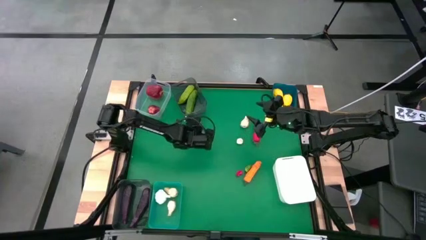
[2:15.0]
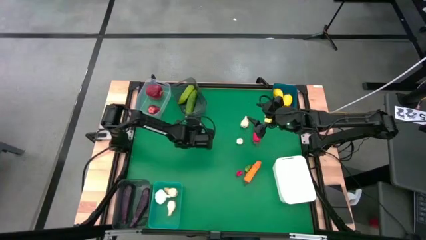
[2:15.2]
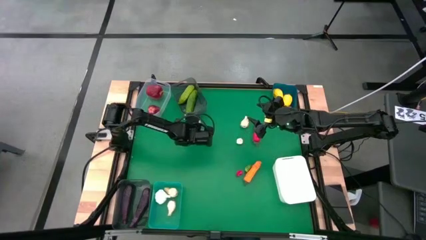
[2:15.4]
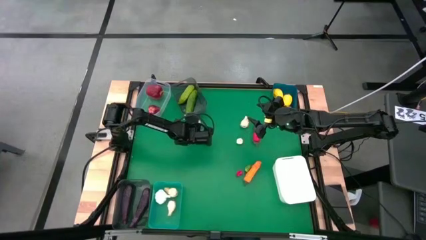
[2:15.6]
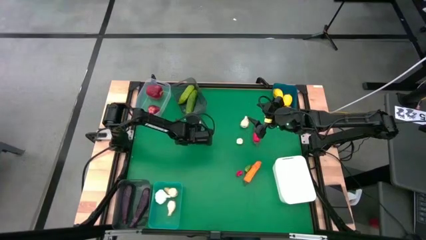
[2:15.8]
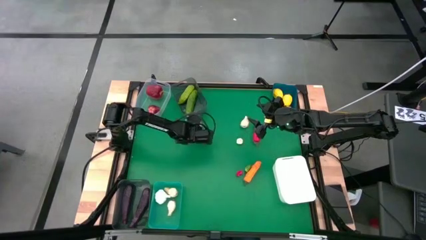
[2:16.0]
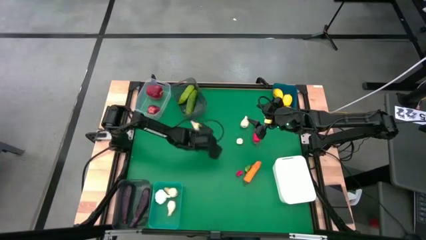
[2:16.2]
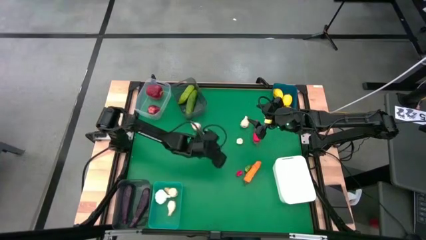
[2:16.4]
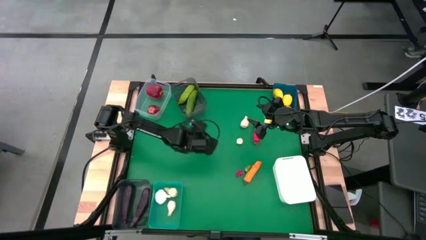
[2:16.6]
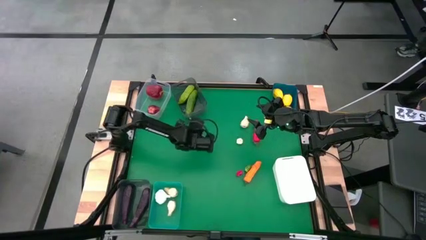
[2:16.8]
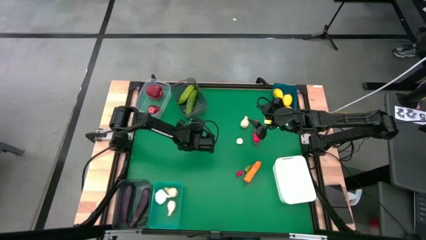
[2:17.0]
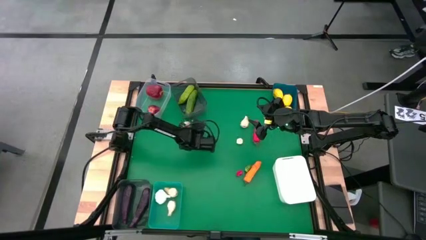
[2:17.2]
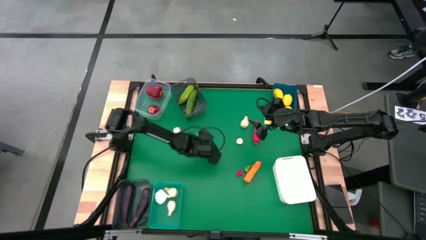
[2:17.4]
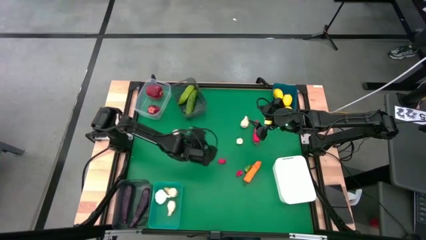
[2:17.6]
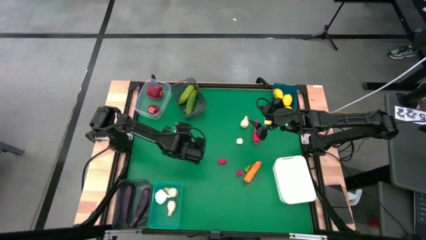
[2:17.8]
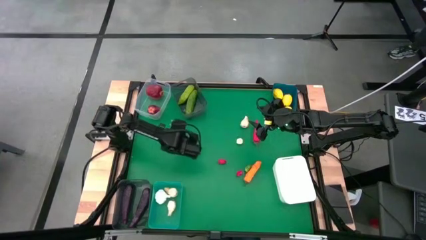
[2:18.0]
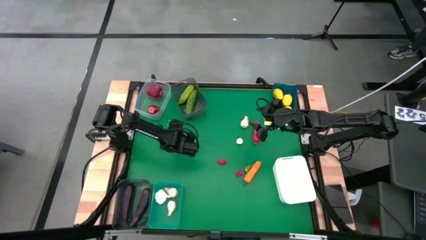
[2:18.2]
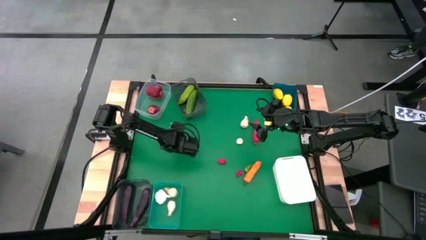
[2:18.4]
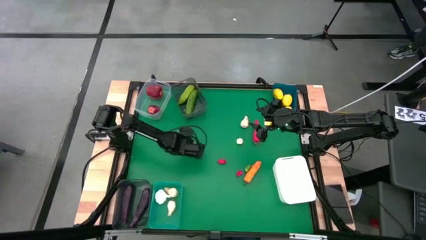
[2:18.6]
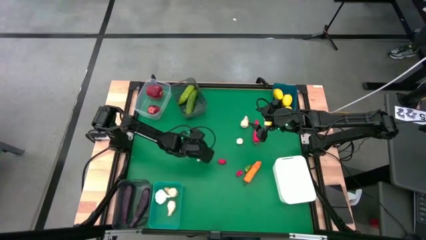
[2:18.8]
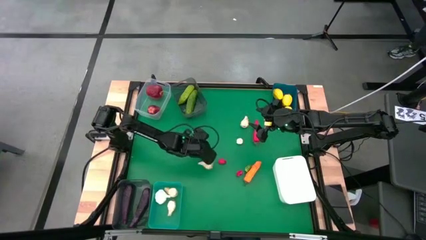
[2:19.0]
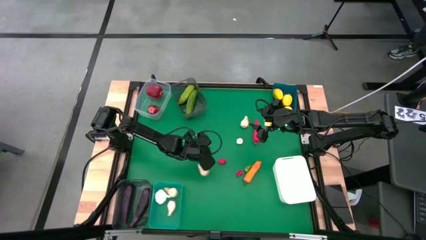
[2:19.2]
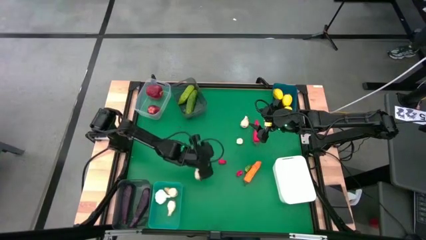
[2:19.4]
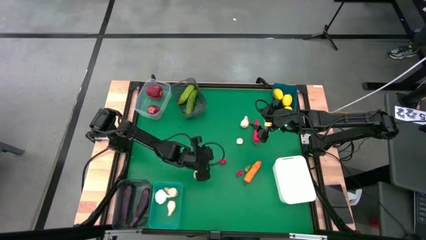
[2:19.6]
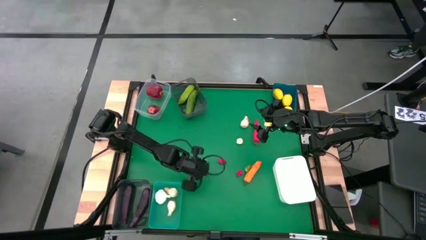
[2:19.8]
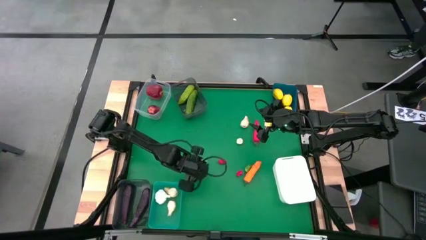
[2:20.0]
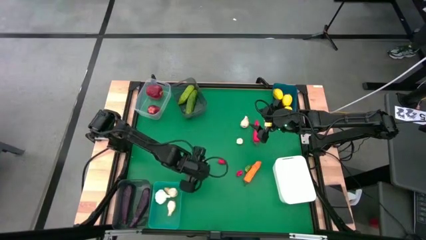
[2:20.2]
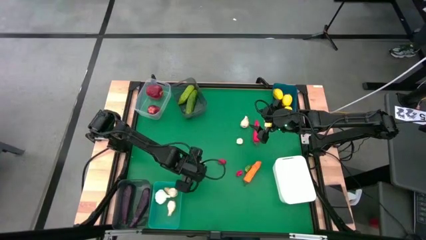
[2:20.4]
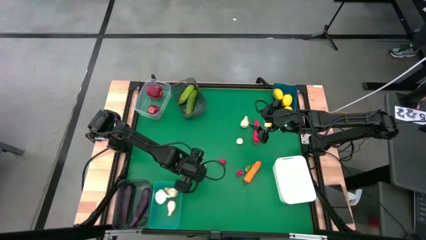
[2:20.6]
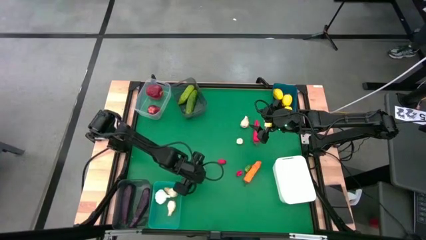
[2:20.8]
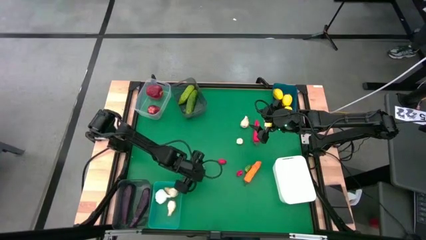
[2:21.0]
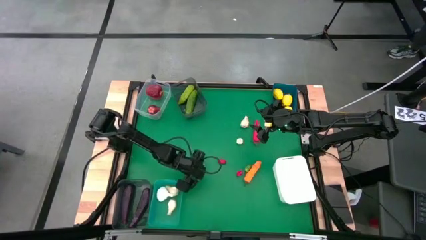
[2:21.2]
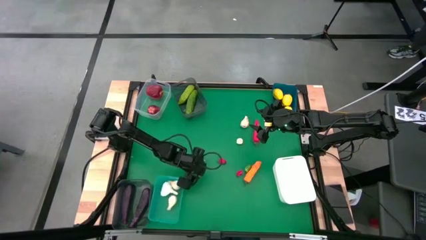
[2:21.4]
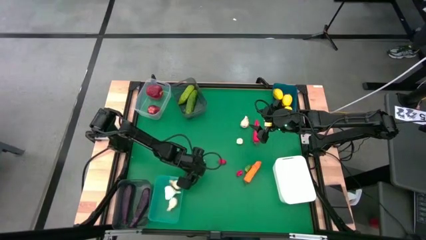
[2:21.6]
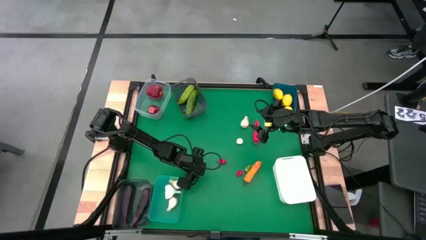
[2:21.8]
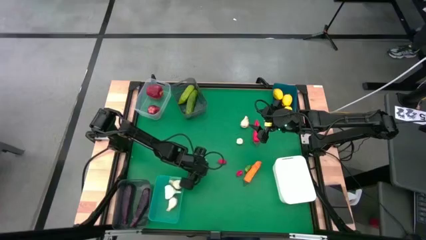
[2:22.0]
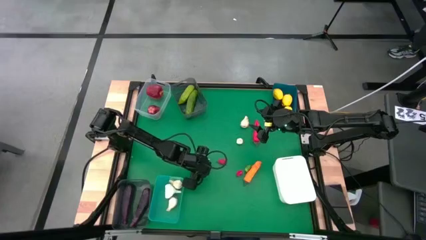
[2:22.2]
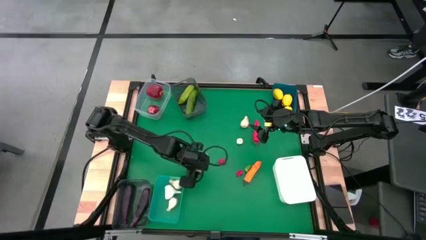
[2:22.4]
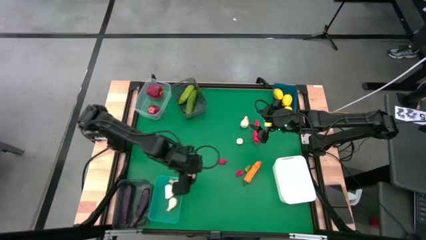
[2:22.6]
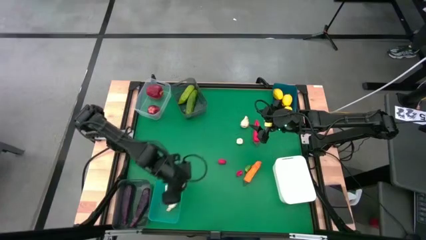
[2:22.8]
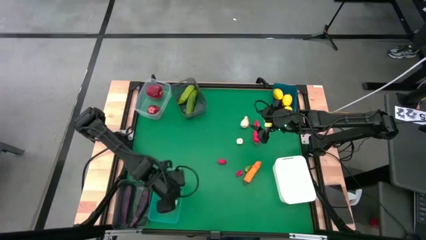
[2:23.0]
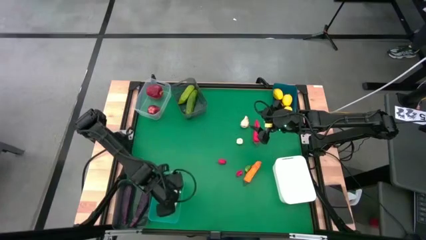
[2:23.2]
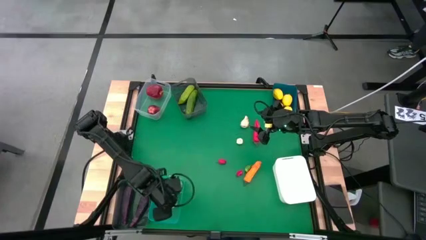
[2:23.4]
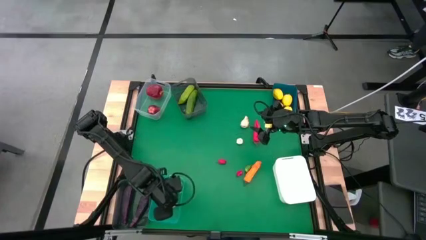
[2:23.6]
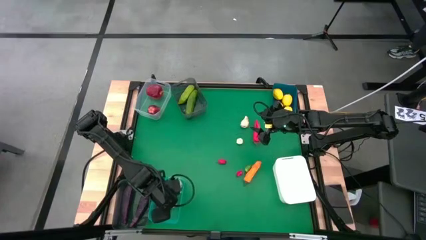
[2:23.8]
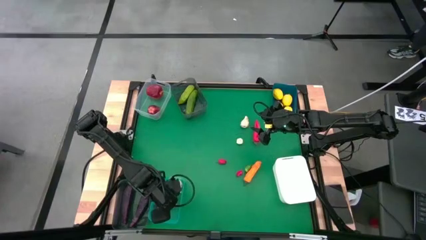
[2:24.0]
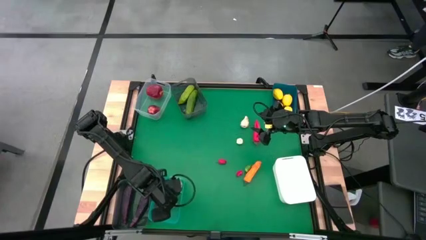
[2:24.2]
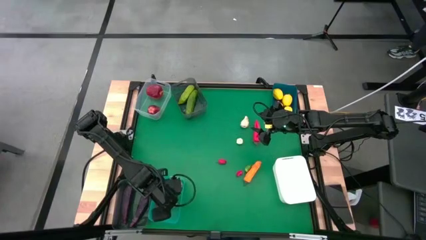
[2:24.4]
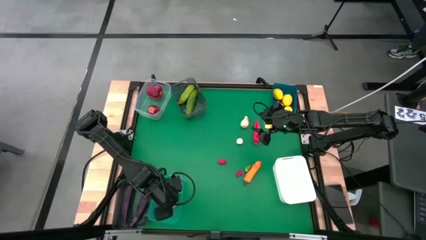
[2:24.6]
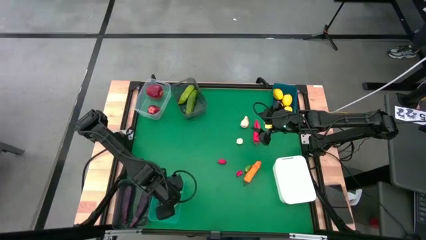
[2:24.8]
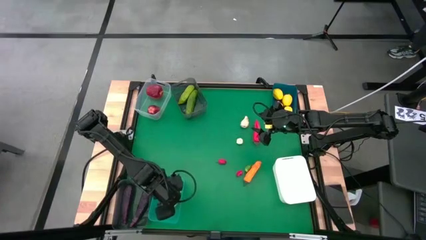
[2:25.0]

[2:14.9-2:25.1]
Task: Sort produce into baskets
Put the garlic into the green bin

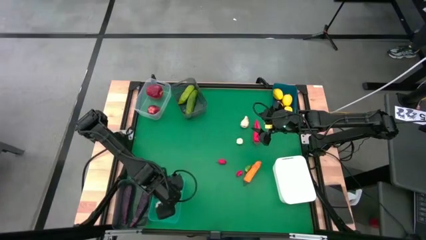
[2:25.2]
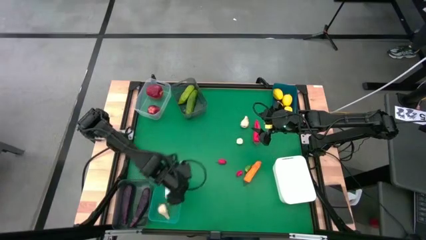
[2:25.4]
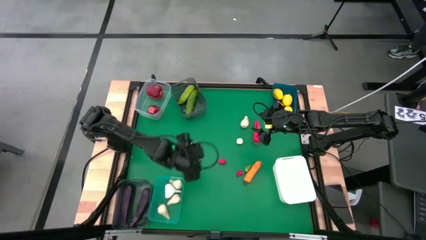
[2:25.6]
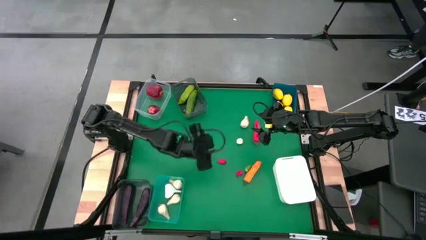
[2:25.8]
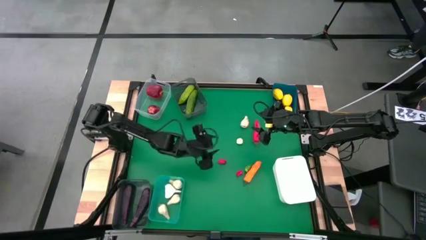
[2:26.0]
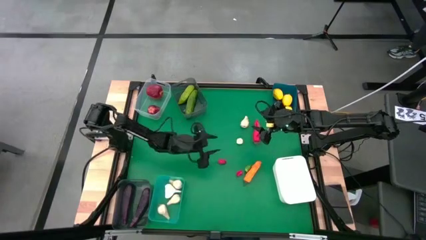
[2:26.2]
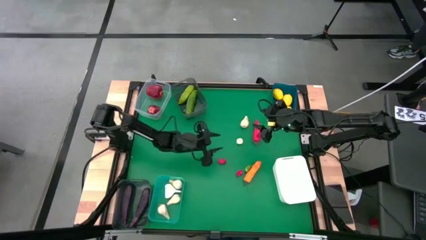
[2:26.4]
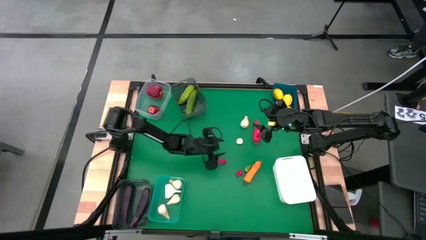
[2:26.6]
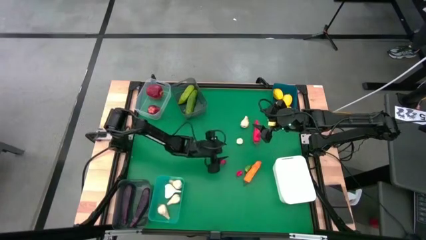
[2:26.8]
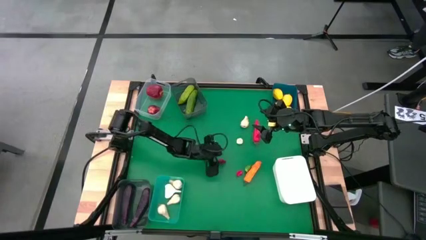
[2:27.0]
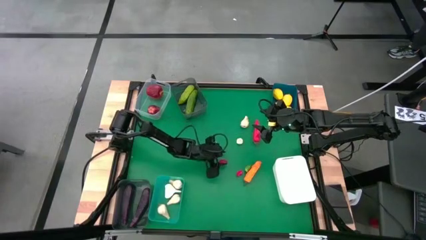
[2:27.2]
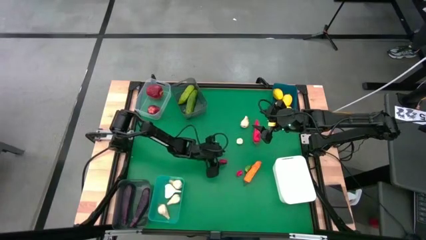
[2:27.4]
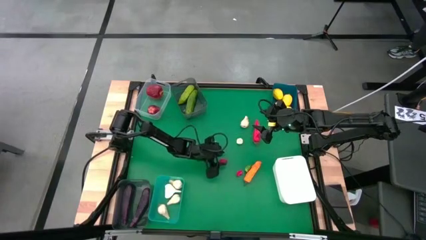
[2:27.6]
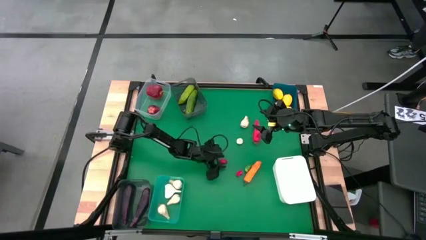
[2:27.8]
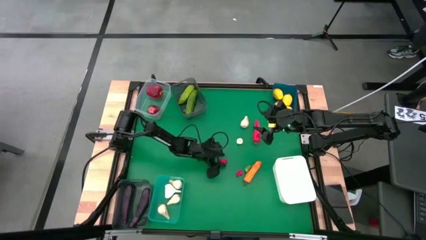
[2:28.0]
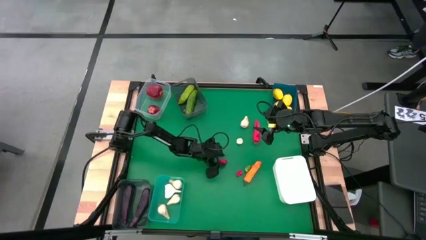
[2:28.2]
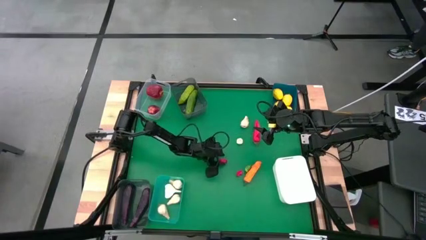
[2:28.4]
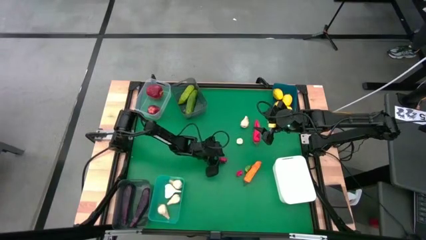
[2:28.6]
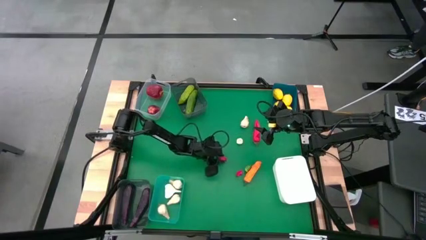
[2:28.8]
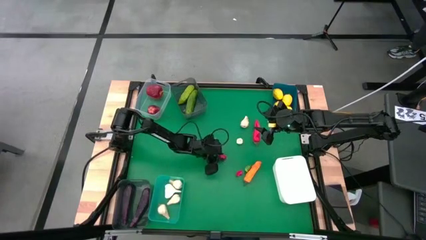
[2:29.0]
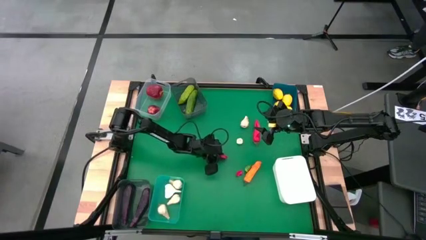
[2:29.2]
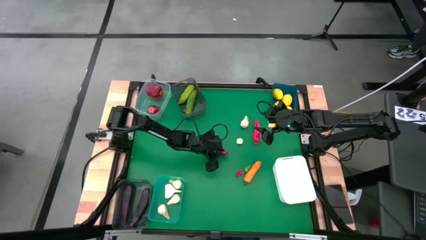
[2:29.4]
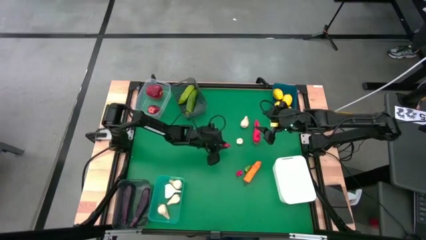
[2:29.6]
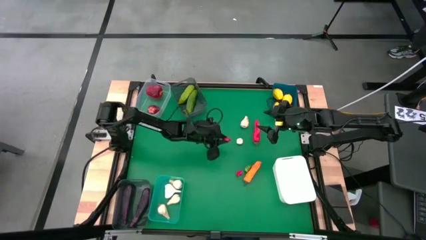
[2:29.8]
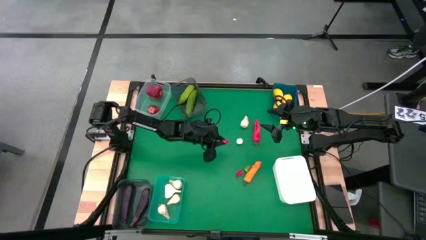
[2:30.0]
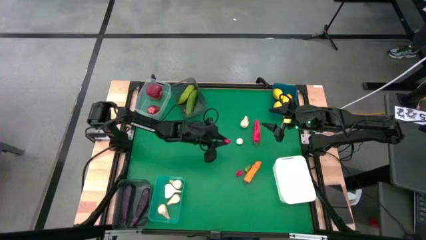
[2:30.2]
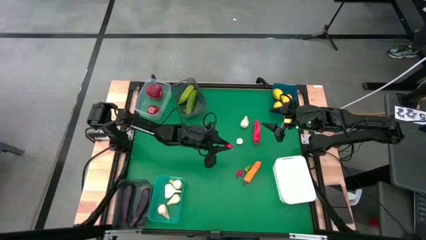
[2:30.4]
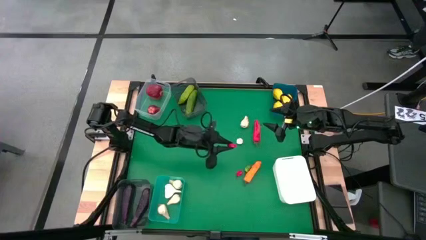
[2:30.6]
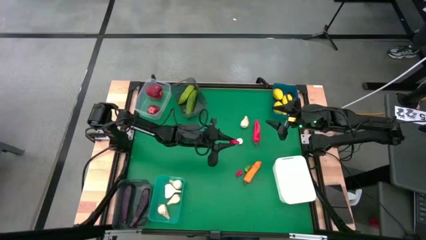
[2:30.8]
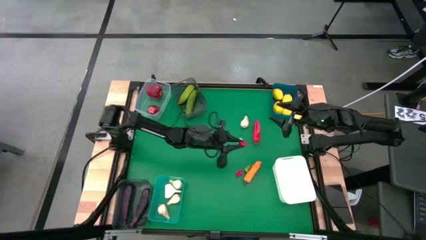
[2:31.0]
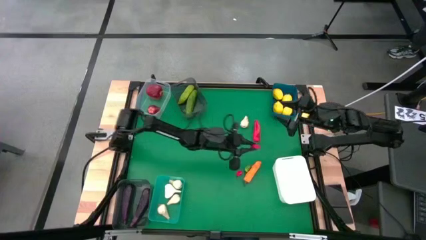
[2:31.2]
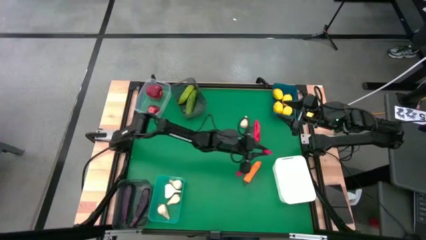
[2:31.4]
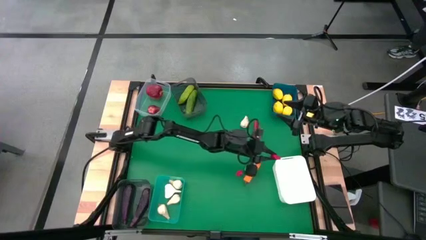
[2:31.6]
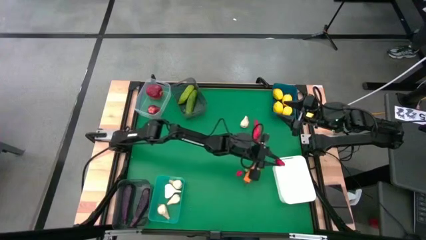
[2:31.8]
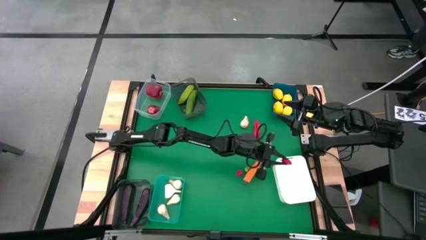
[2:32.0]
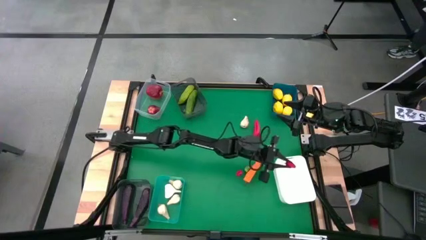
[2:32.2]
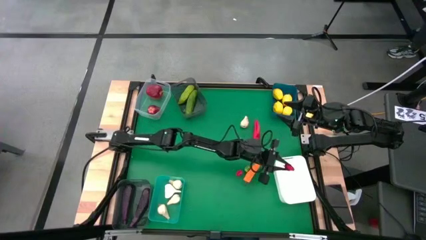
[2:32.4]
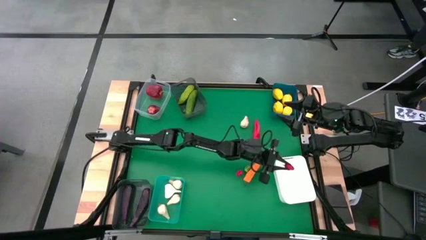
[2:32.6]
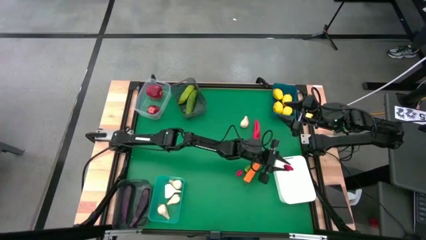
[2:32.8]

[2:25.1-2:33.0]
Put the small red chili pepper into the white bin
